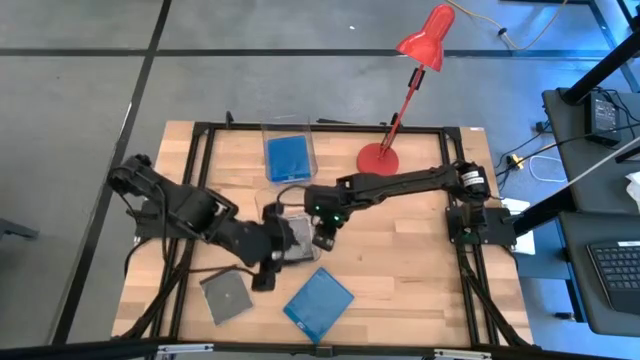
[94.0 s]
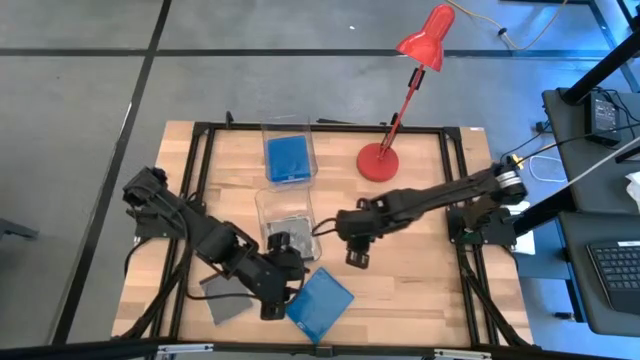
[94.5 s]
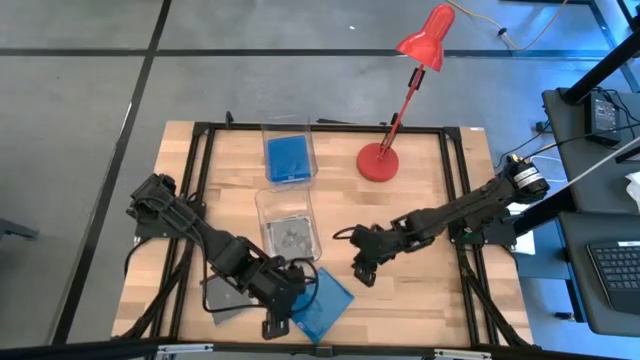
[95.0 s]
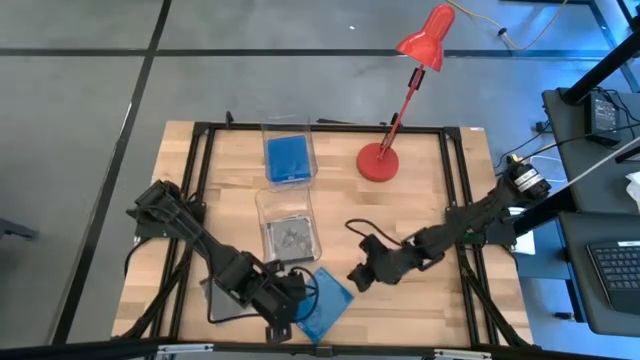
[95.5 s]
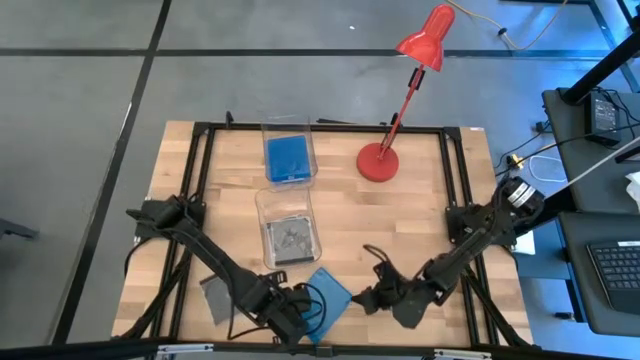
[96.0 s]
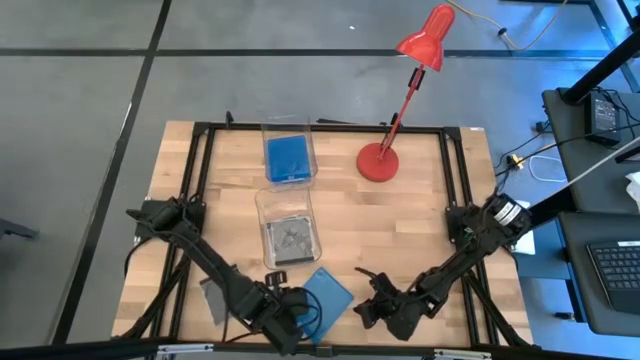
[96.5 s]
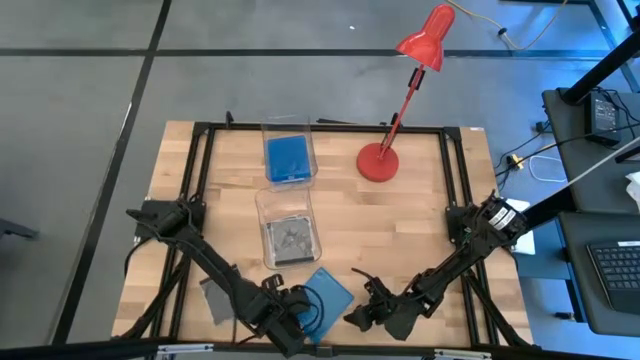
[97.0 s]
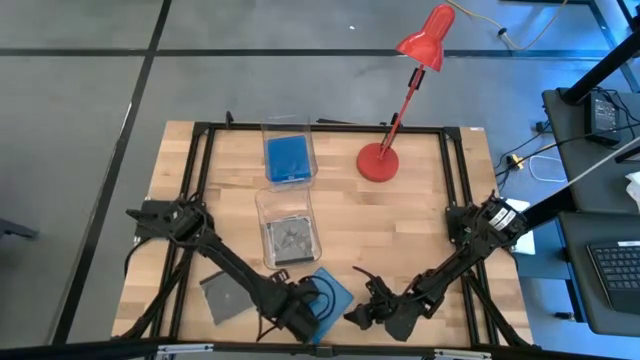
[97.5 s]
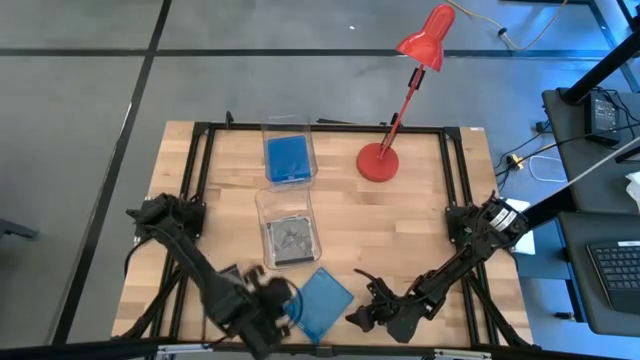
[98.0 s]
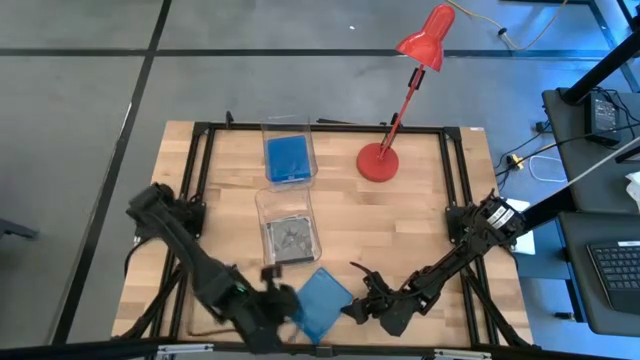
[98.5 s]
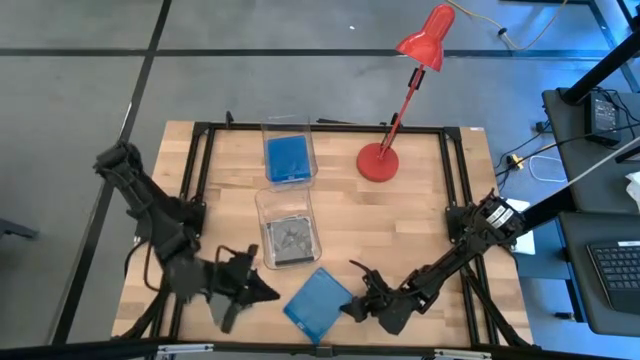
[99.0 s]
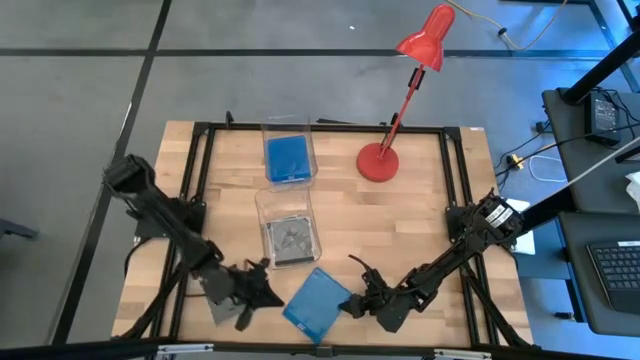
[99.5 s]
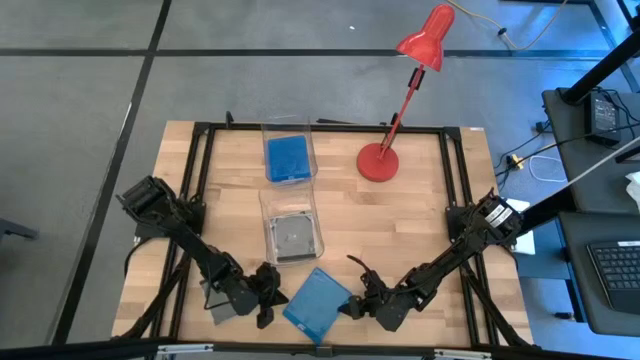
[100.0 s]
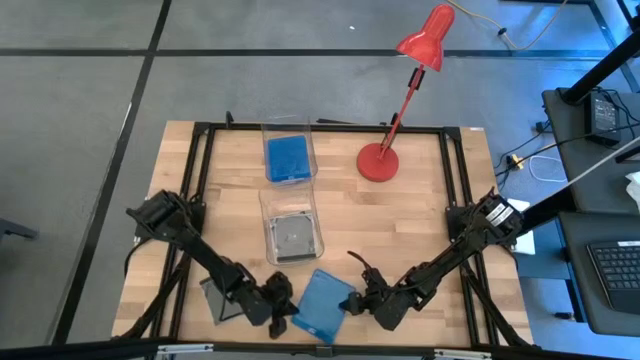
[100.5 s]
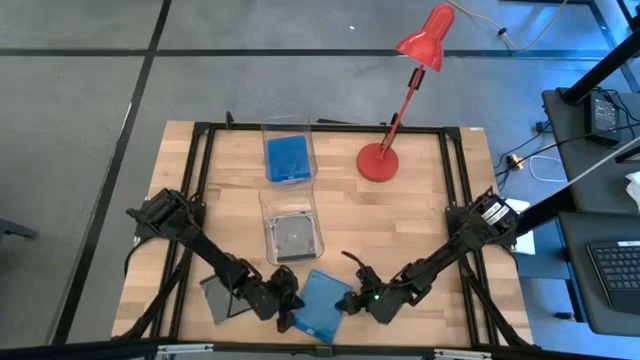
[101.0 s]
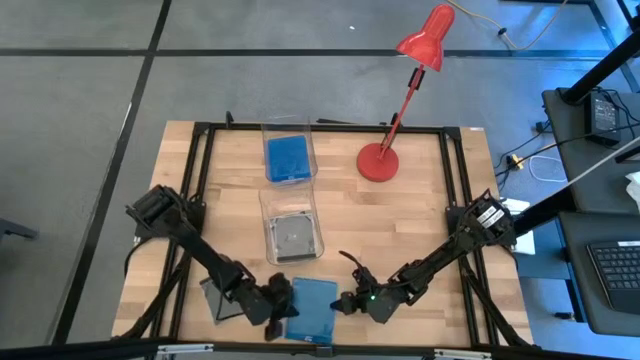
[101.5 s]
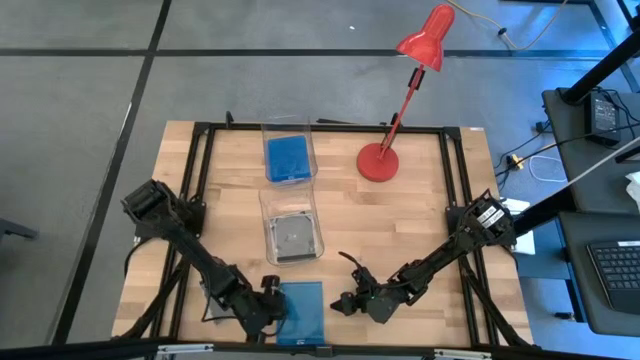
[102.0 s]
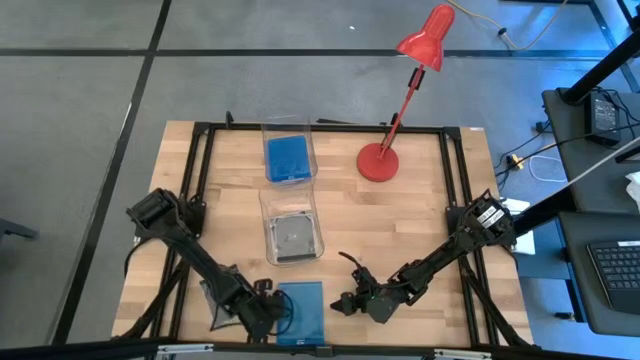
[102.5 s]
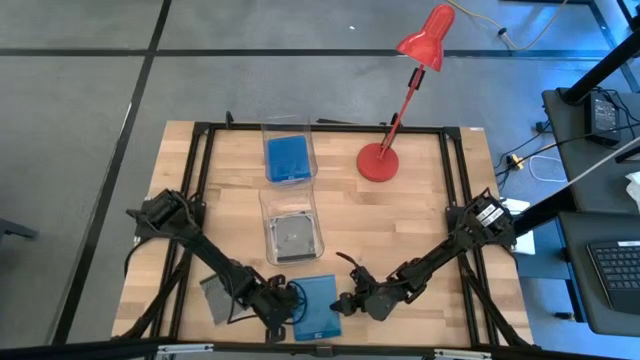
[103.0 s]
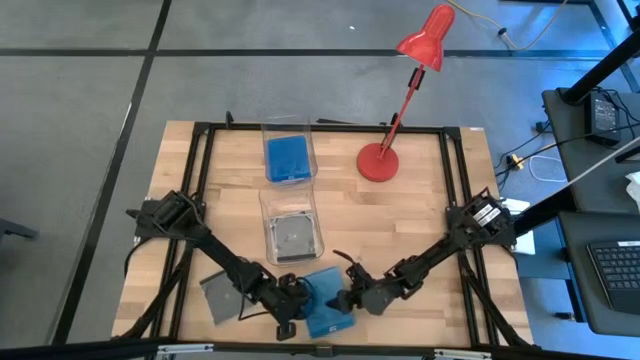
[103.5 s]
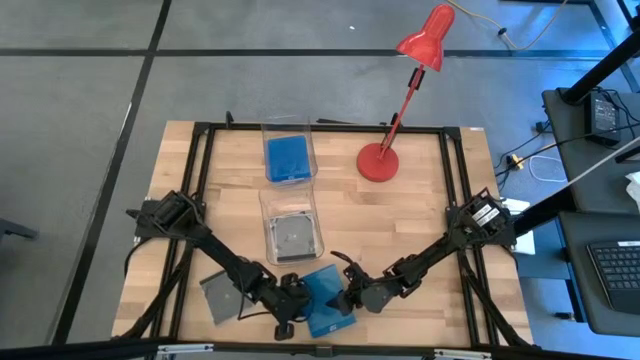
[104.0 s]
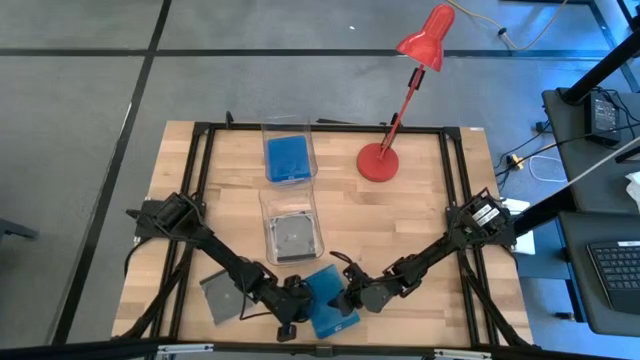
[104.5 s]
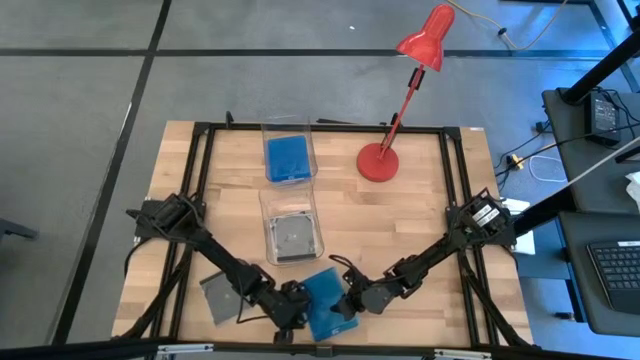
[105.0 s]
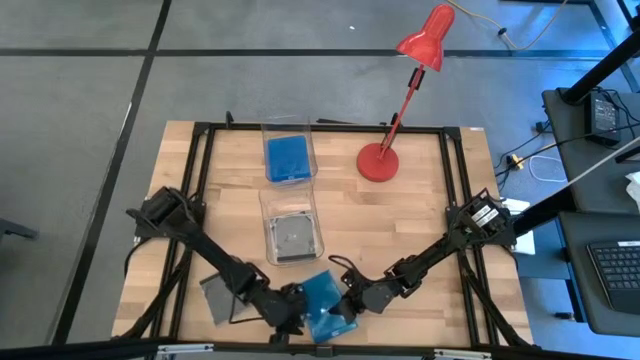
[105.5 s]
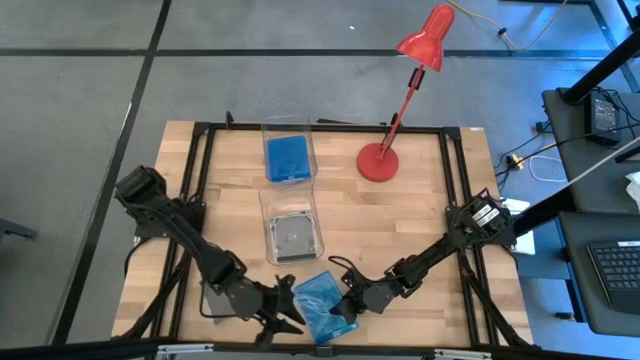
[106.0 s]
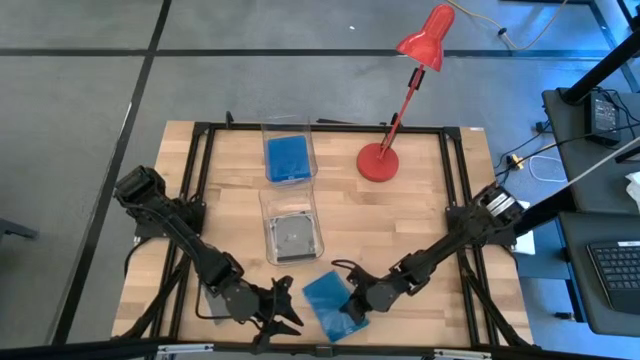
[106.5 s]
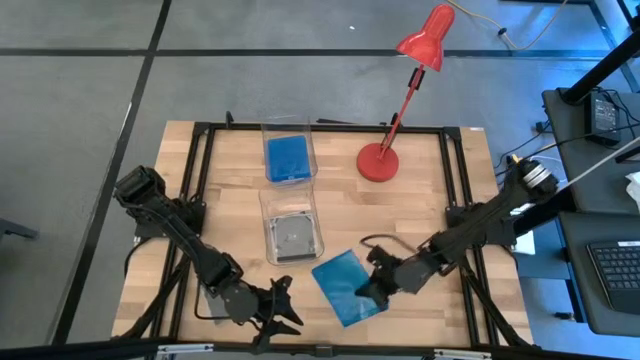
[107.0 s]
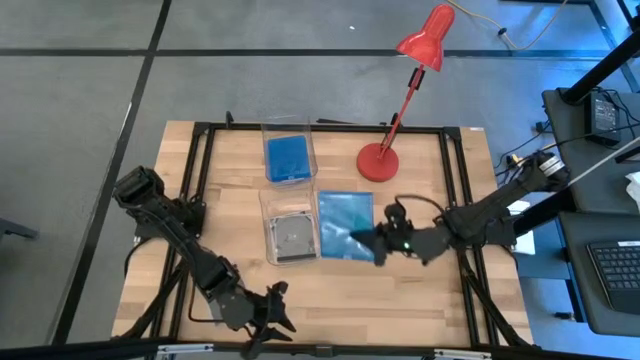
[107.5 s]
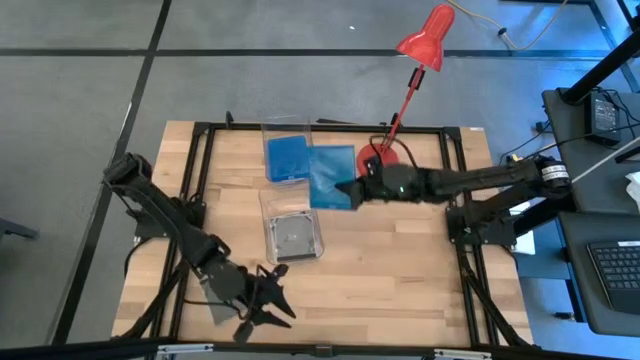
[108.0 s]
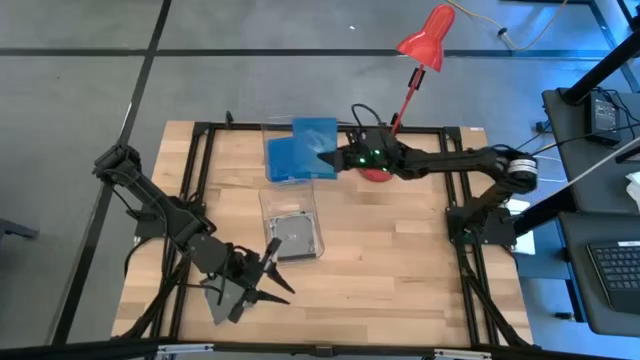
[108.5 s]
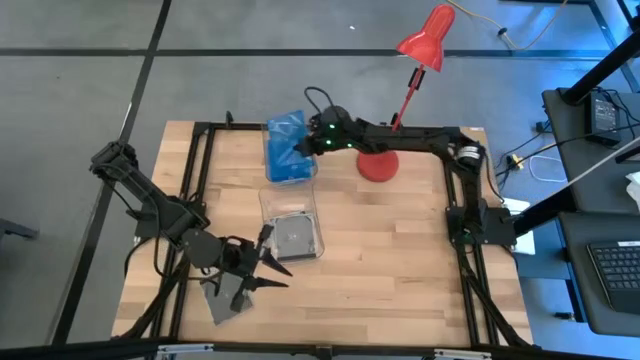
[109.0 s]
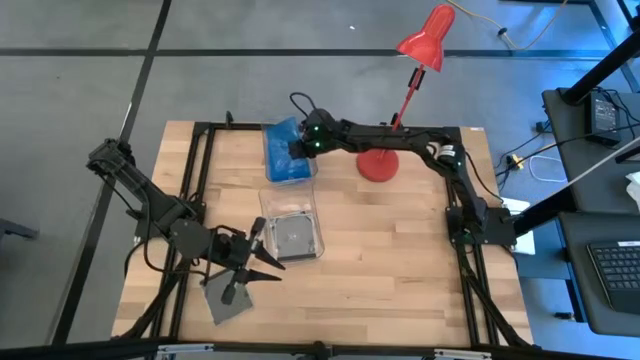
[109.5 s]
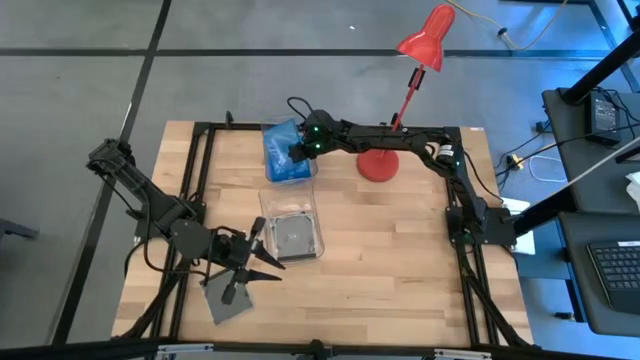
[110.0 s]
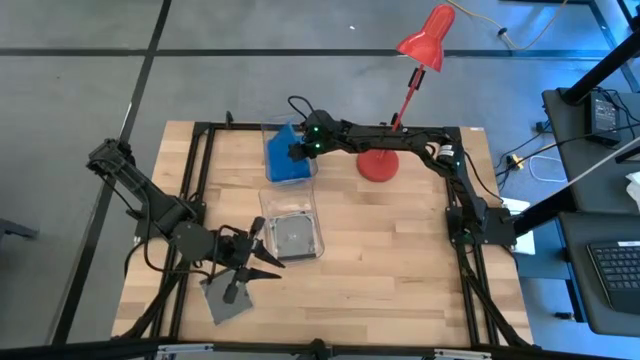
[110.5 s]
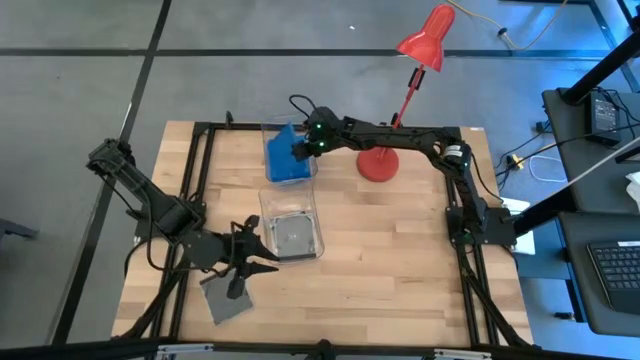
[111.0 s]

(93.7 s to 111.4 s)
Task: Pick & place jewel cases by type
Put the blue cd case into the top transparent bin

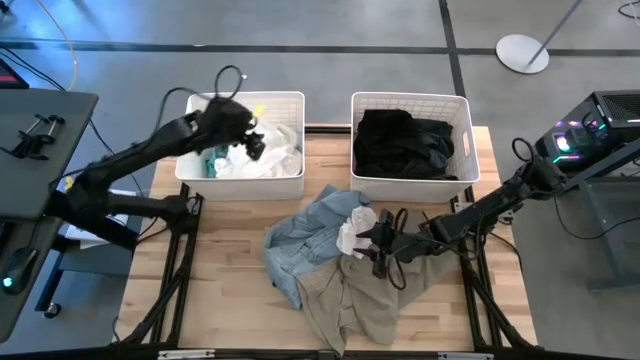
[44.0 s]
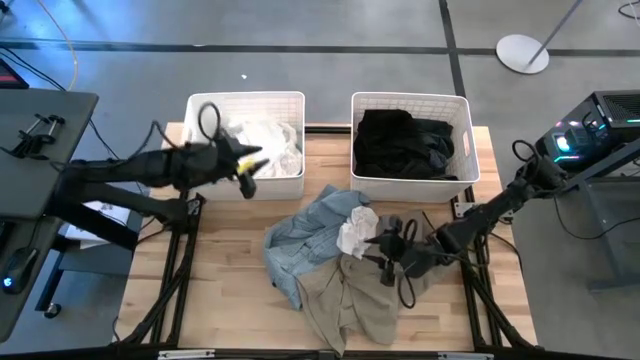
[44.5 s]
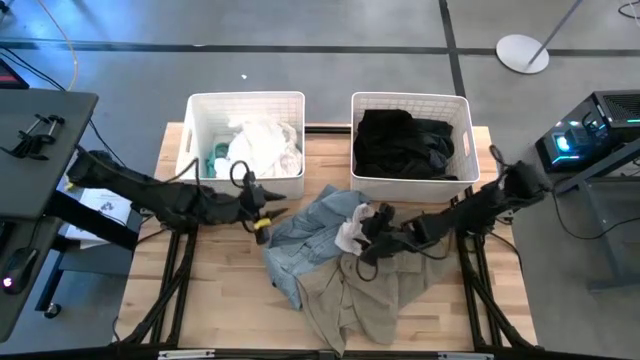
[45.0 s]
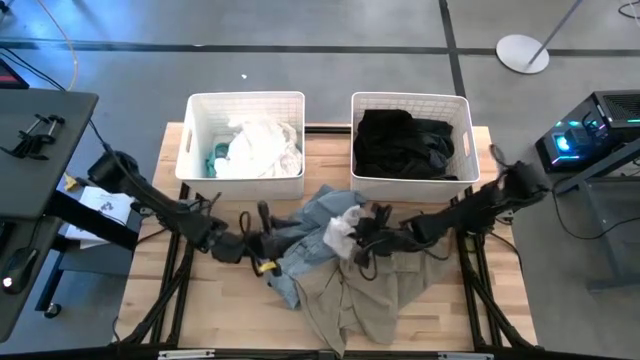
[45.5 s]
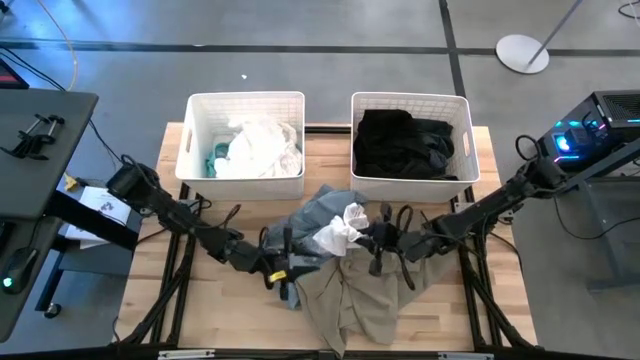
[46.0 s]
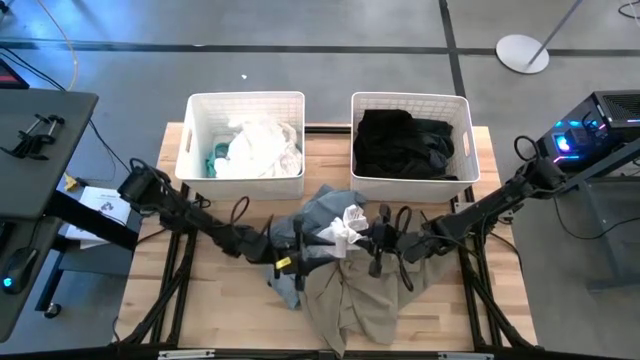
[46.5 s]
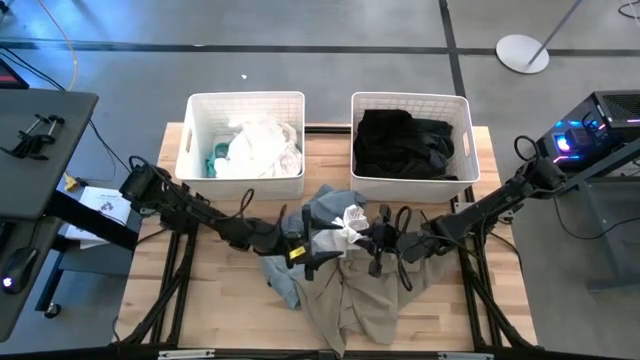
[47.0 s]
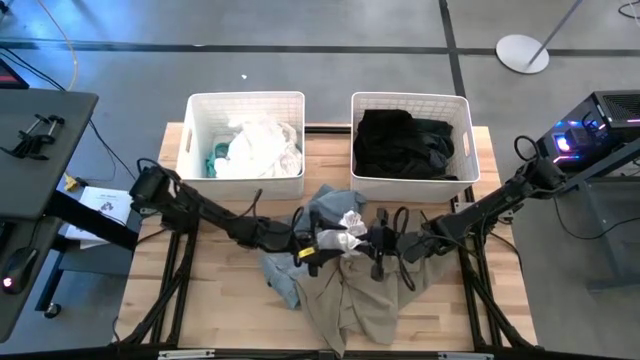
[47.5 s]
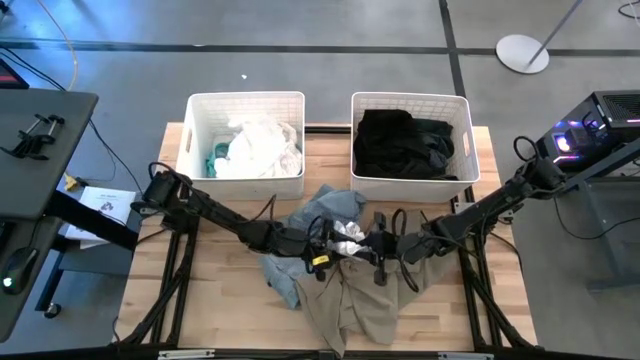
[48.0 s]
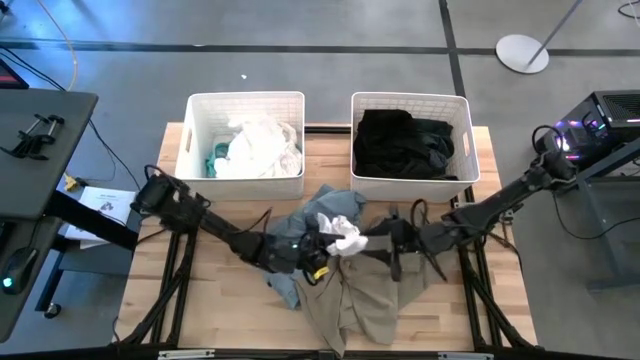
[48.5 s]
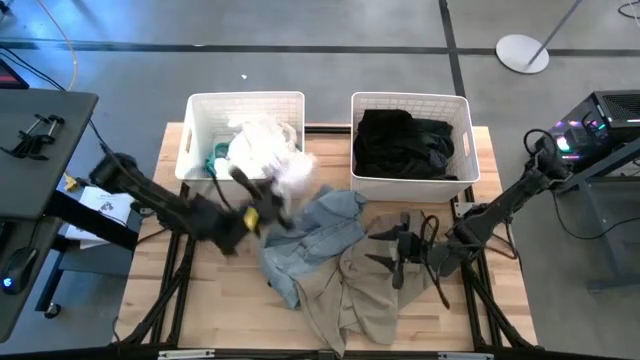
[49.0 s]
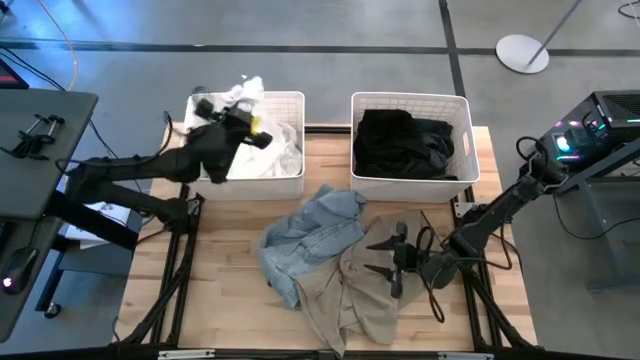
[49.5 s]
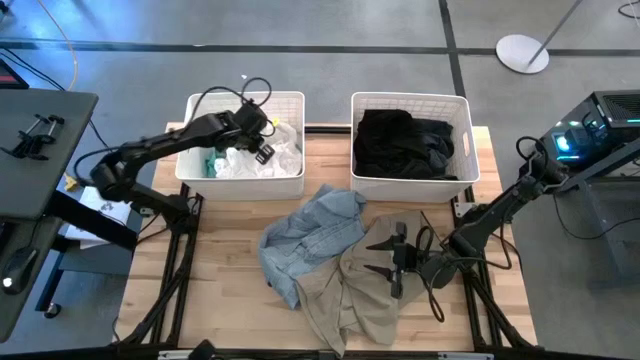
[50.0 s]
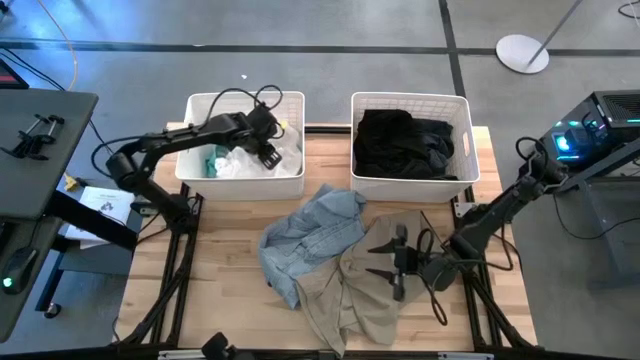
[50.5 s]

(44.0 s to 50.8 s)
Task: Sort clothes
Put the white underwear into the left white laundry bin
